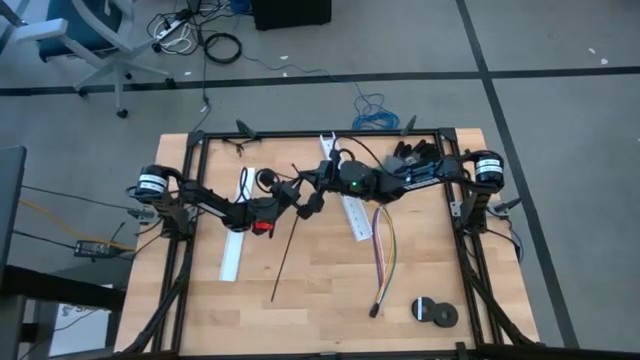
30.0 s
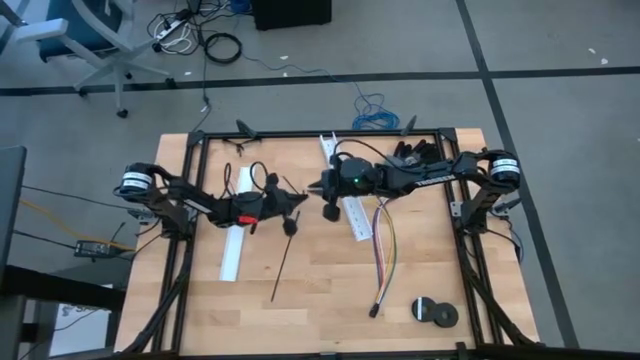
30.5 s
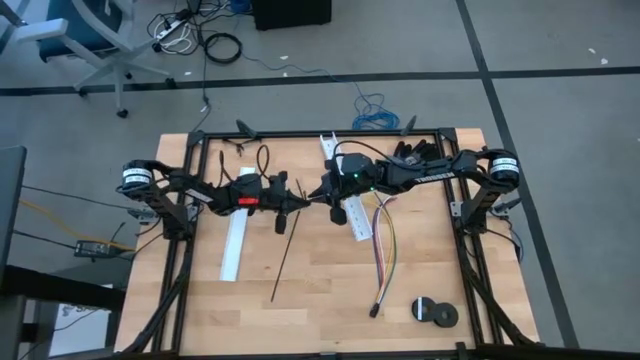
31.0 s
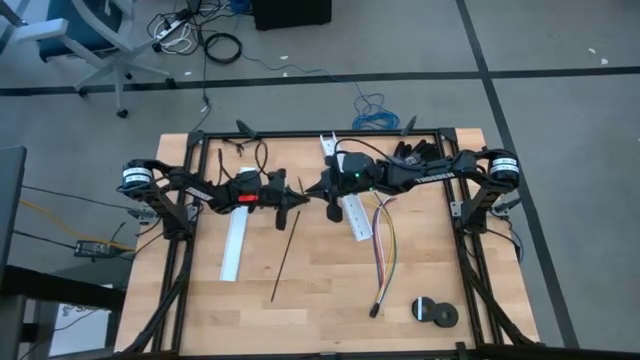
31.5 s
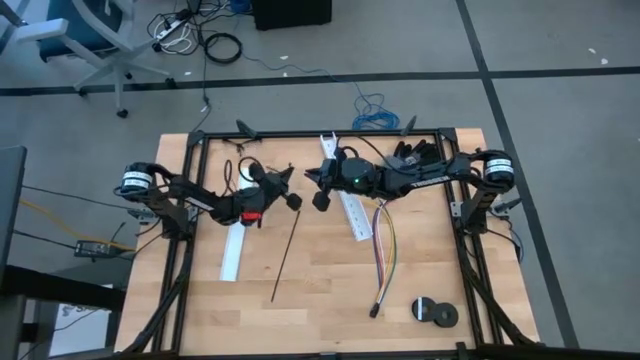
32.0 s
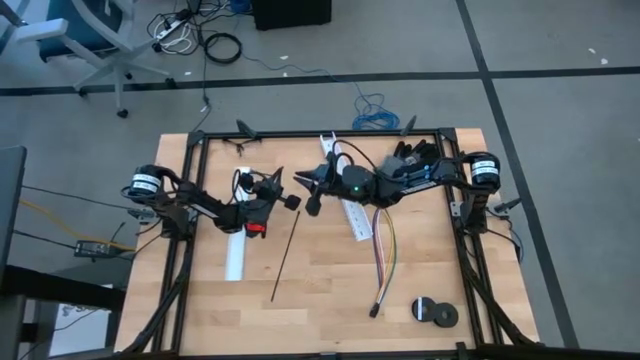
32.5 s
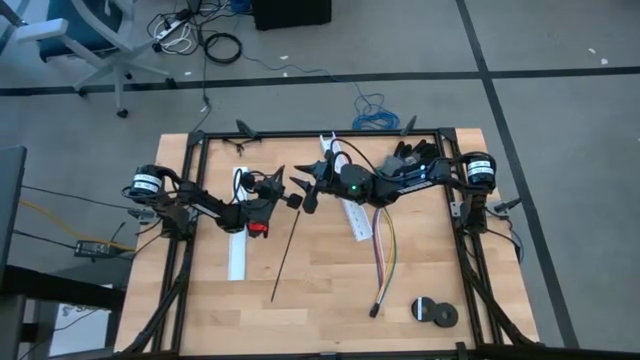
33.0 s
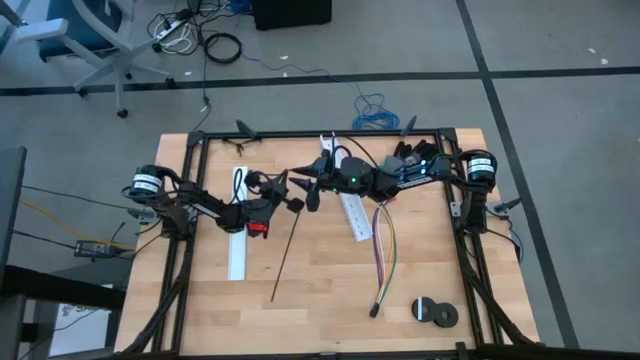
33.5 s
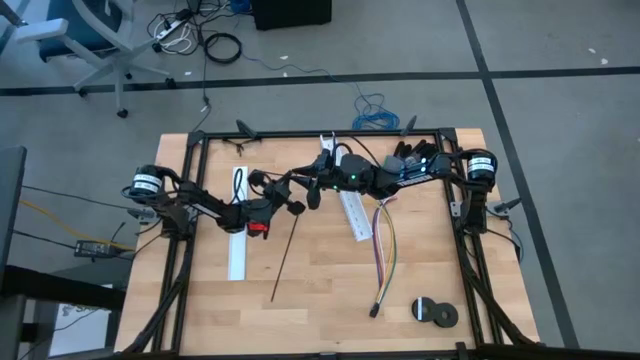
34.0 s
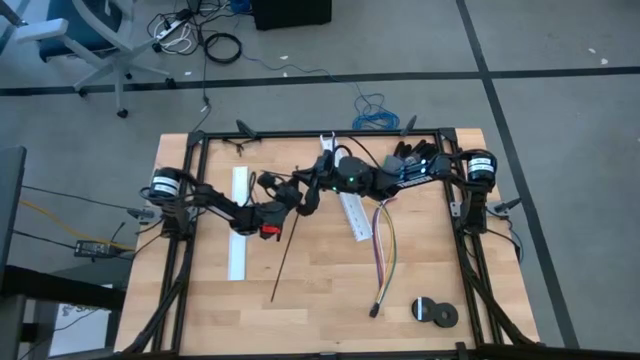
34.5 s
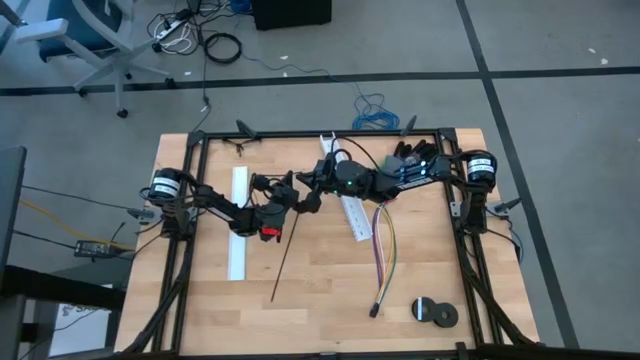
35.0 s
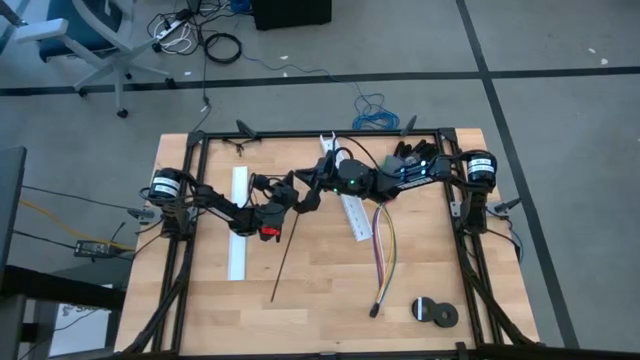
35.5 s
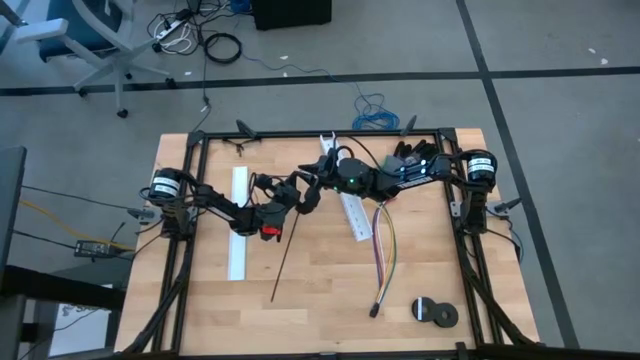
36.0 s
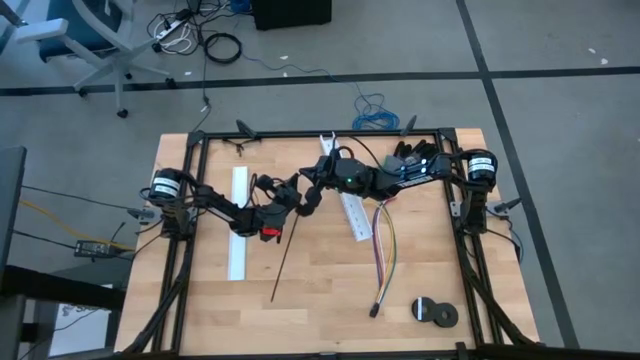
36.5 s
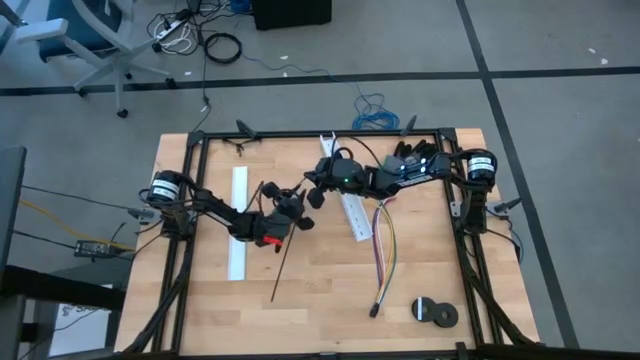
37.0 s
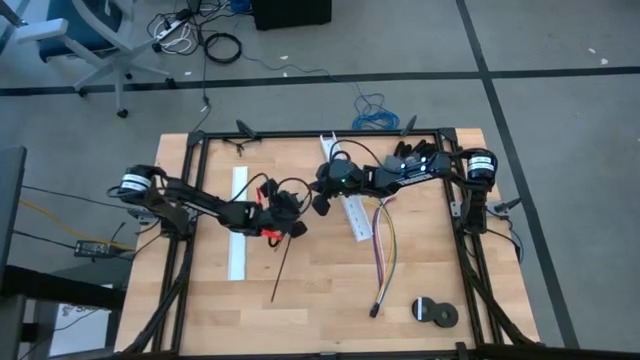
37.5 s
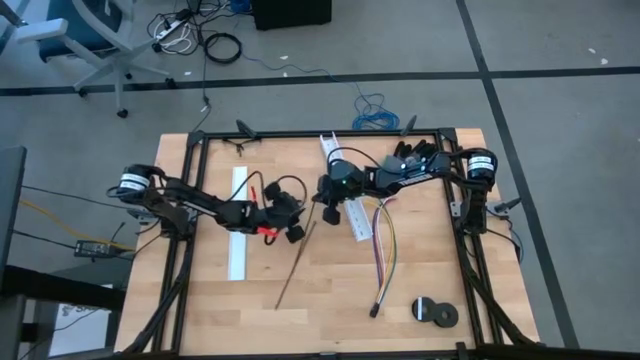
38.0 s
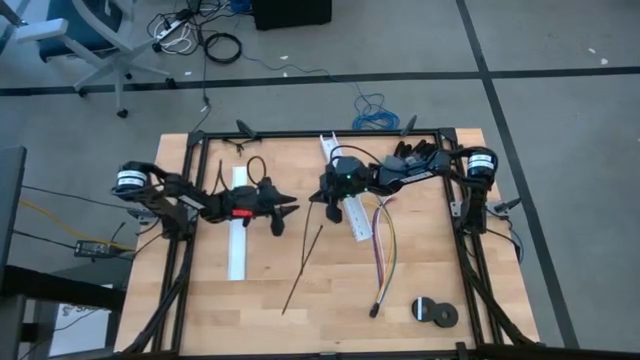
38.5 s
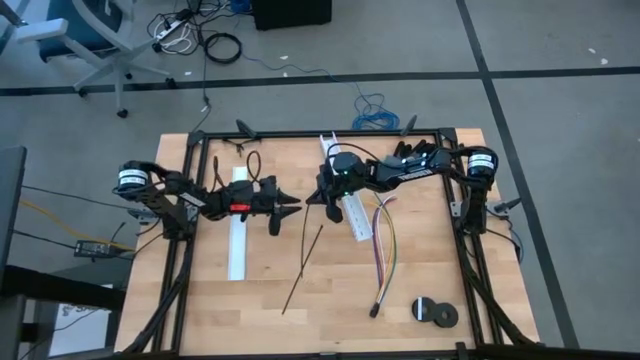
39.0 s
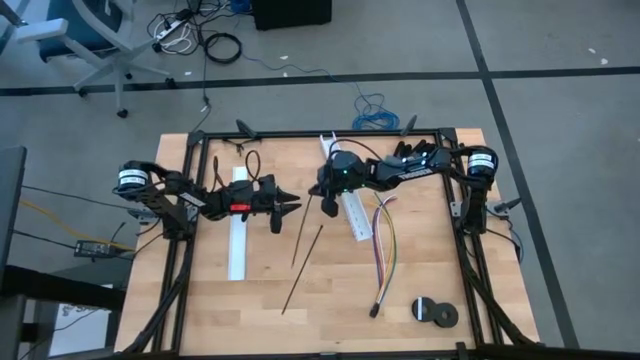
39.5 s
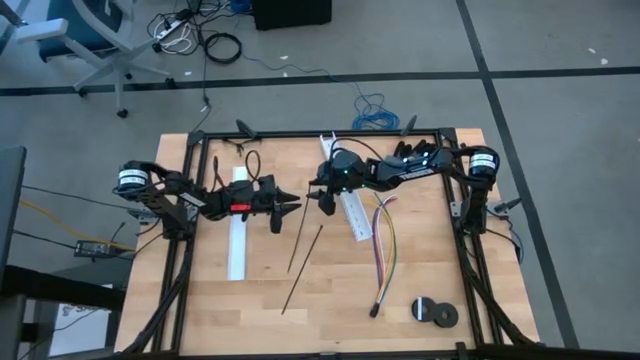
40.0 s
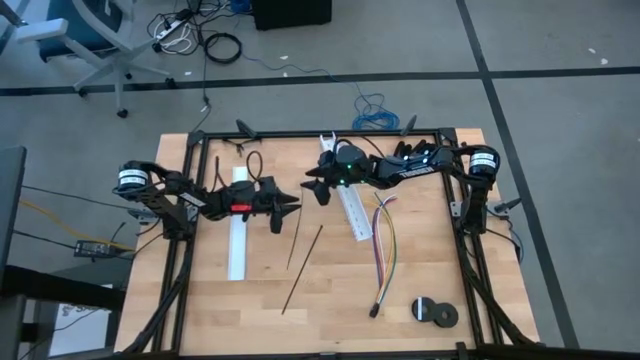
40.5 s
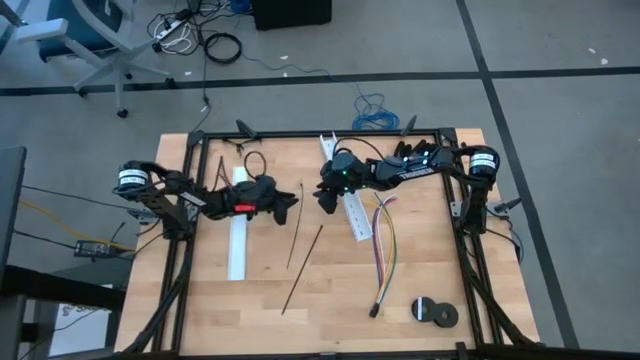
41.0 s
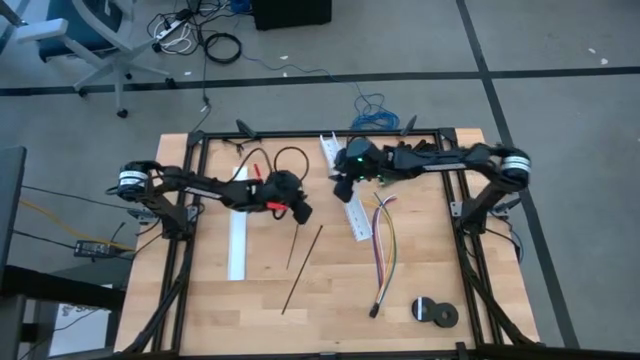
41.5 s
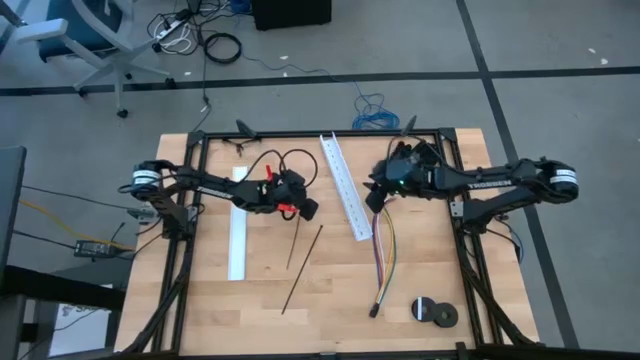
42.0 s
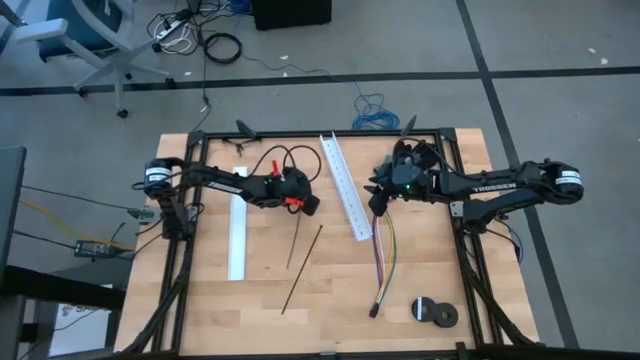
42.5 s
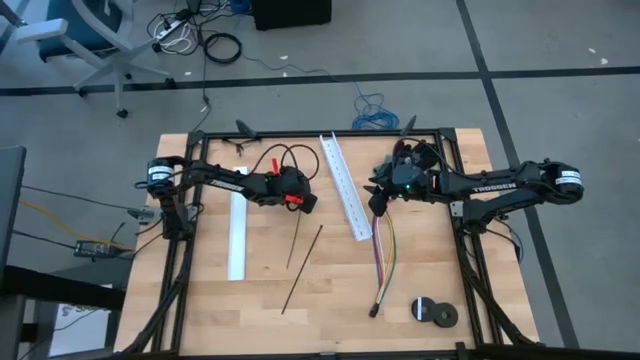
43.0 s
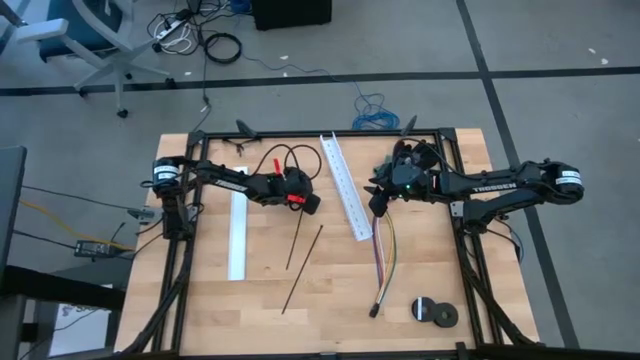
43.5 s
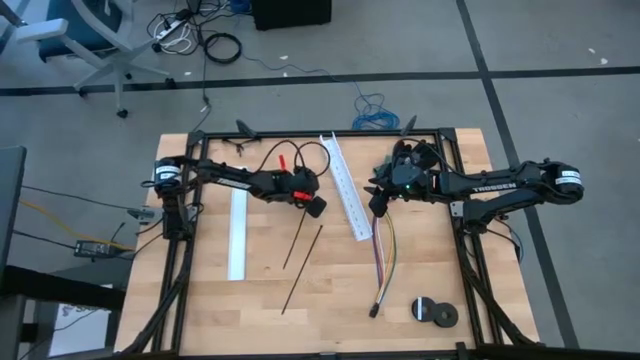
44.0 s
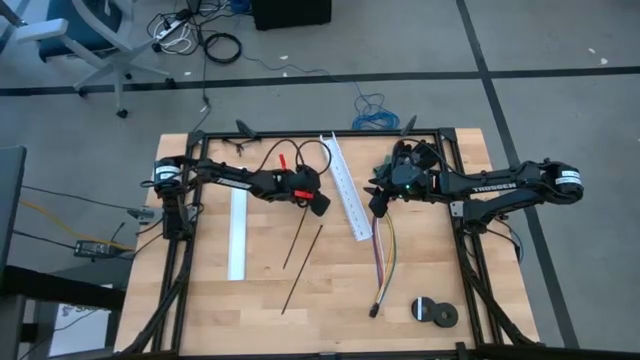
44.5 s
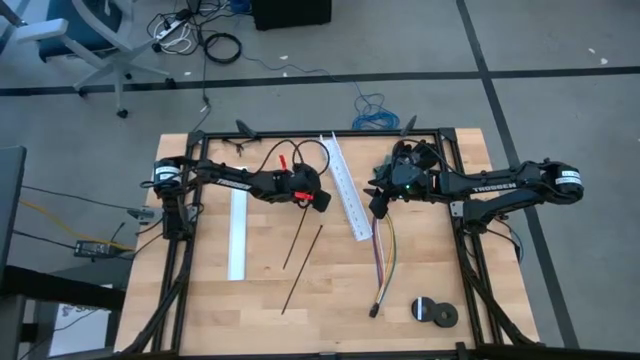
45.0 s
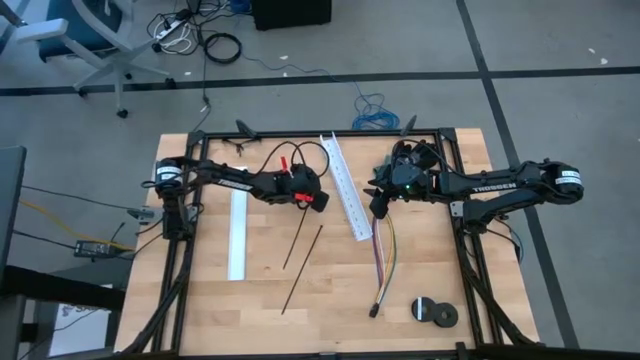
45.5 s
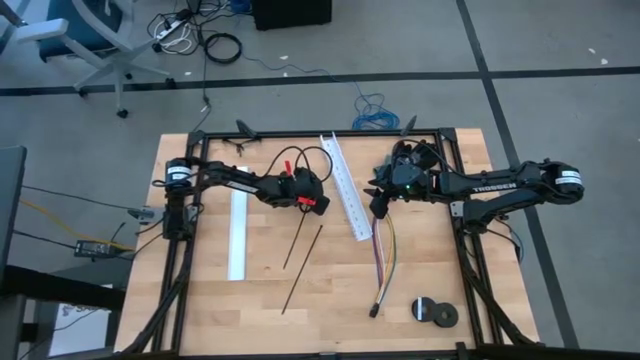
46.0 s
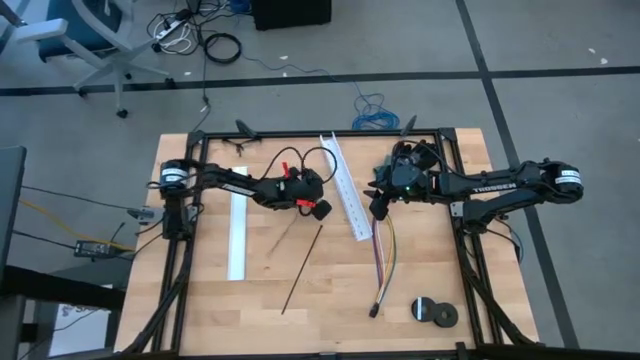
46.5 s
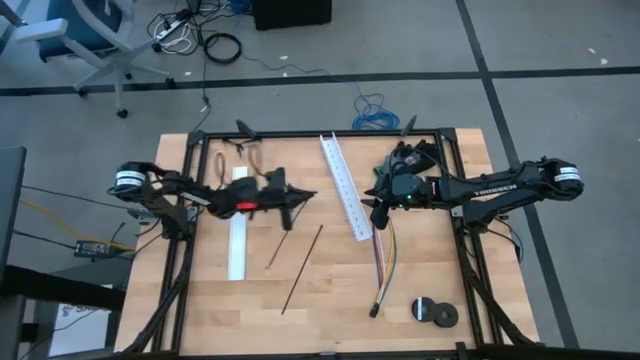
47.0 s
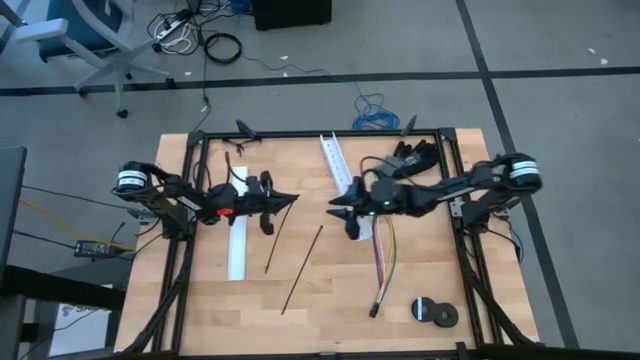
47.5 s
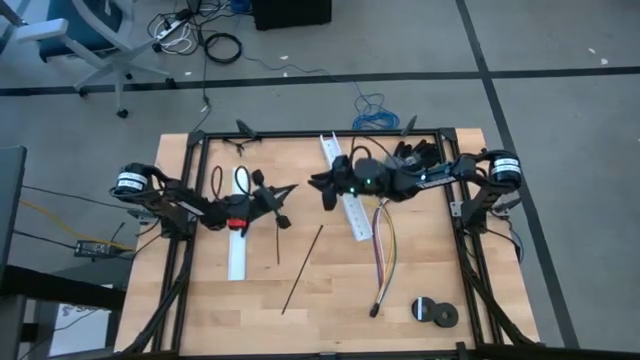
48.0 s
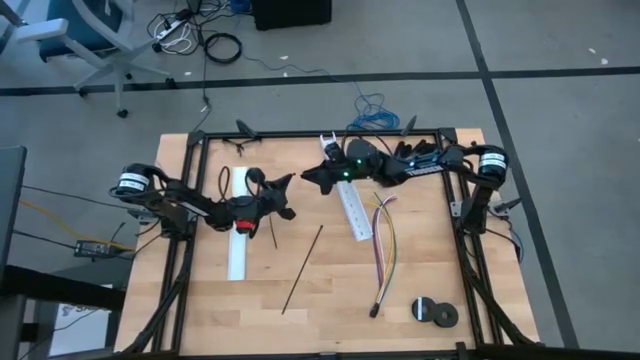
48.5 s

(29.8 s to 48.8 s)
Task: Ziptie cables
Prepare the black zip tie

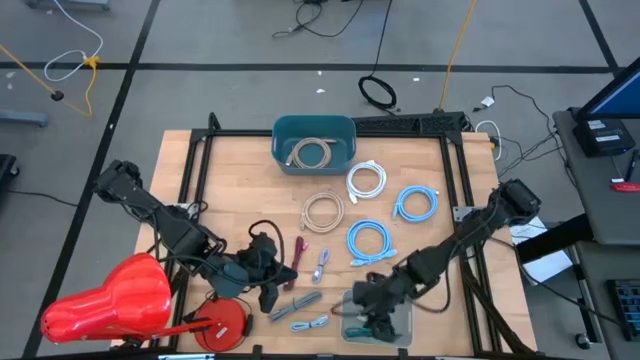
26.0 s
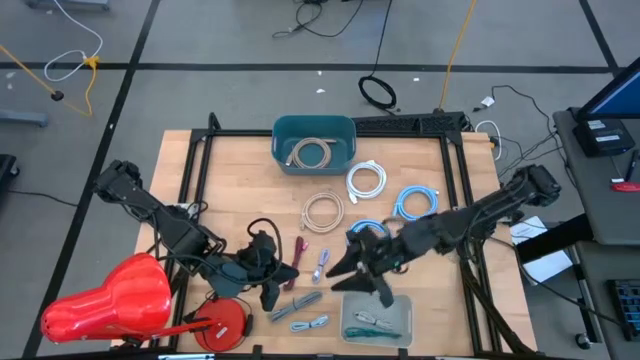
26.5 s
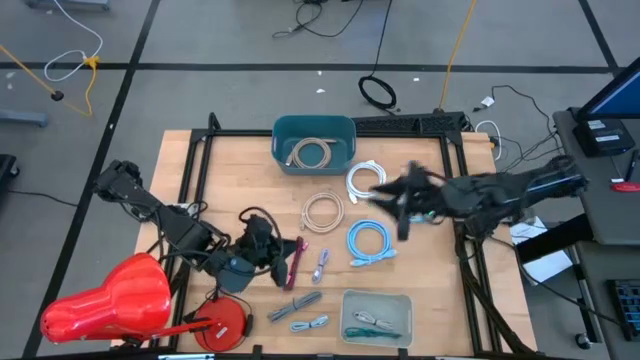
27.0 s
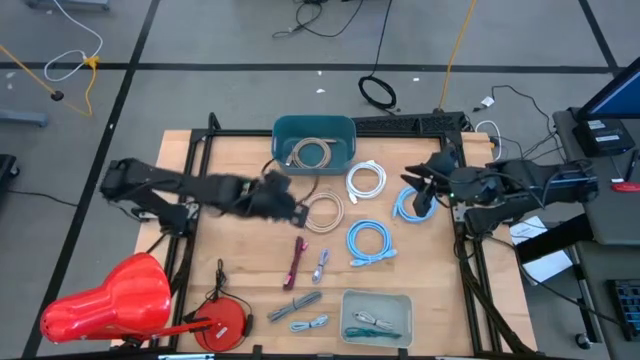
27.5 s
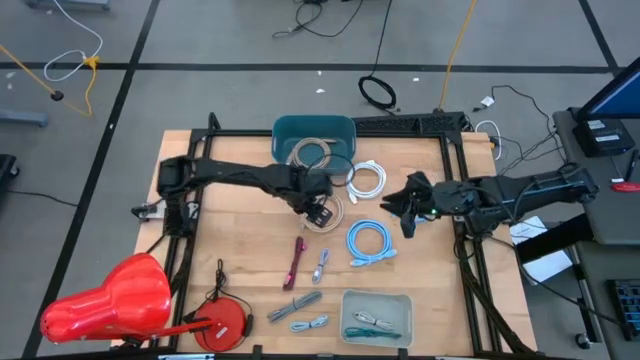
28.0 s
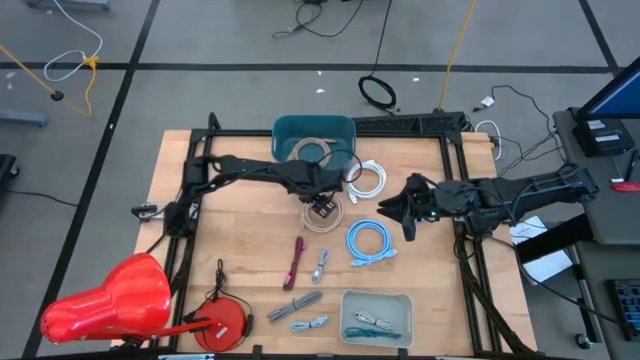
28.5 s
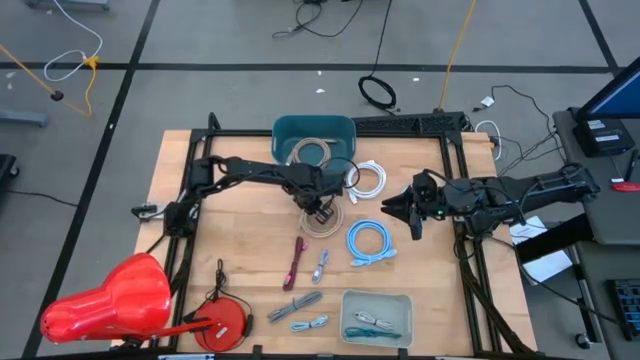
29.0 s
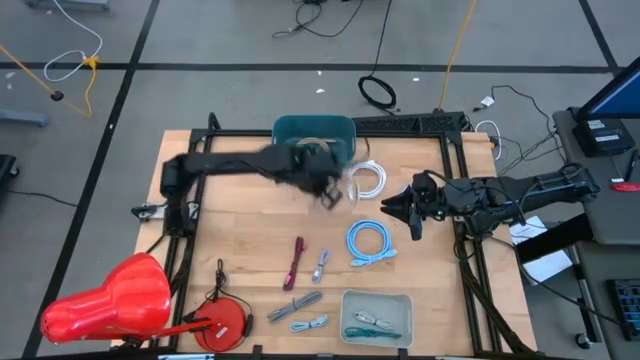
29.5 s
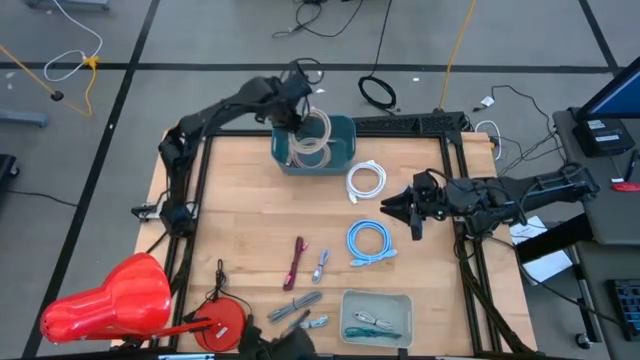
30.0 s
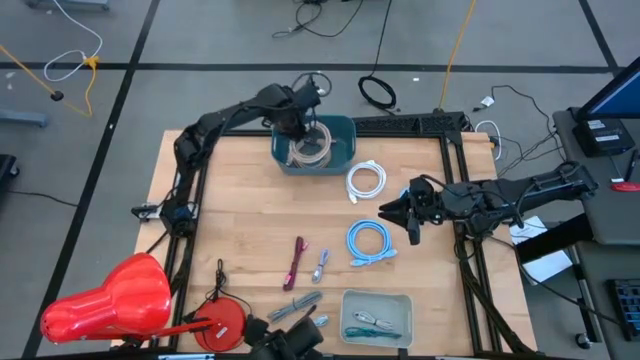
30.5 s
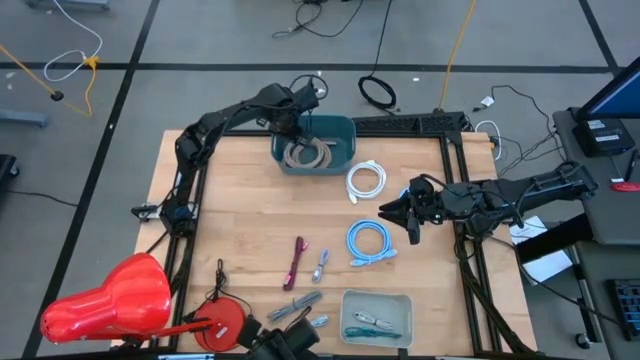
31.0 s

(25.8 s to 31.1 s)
Task: Pick & Place USB Port
Put the light brown HDMI cable into the blue bin
